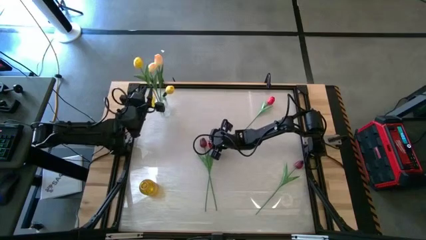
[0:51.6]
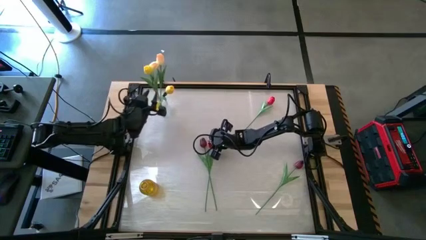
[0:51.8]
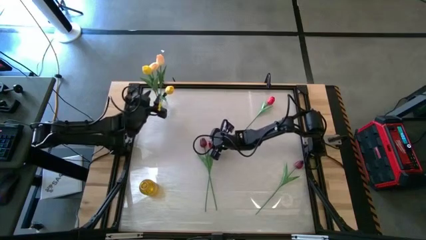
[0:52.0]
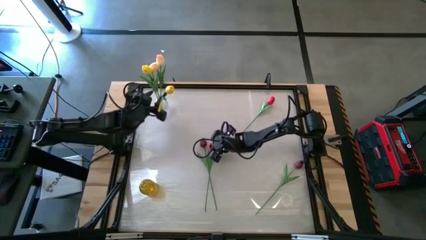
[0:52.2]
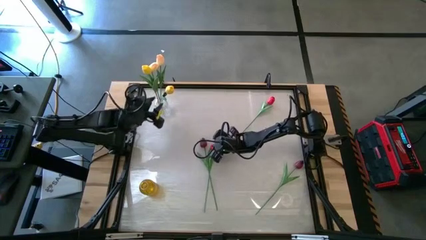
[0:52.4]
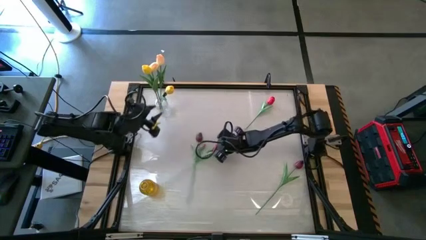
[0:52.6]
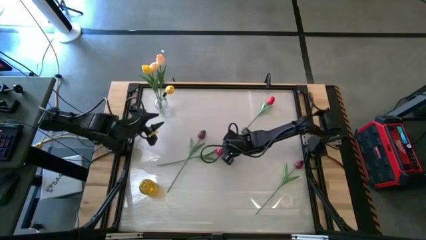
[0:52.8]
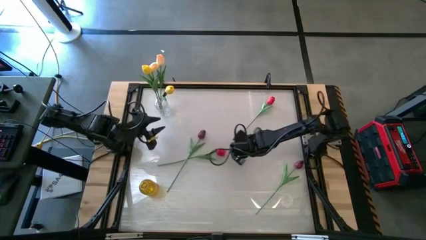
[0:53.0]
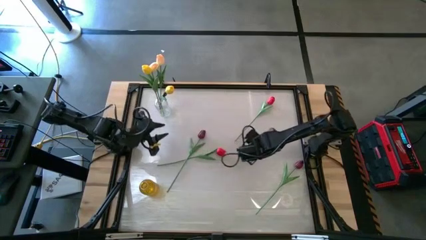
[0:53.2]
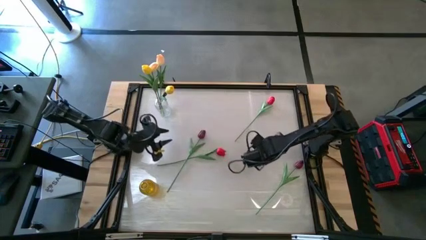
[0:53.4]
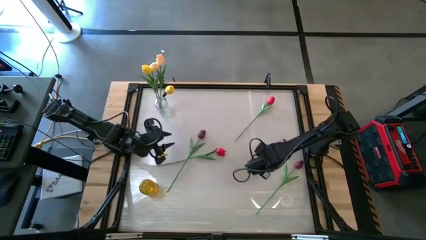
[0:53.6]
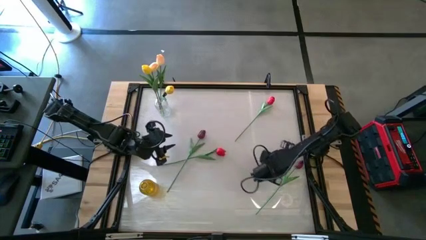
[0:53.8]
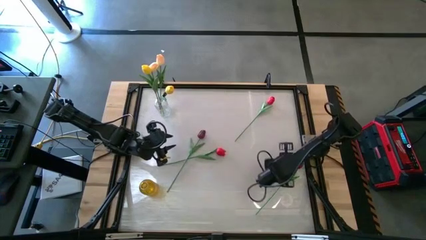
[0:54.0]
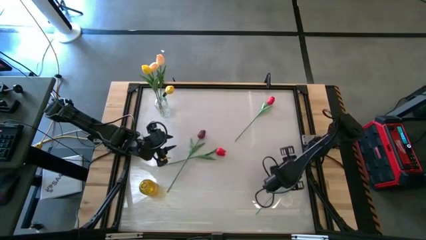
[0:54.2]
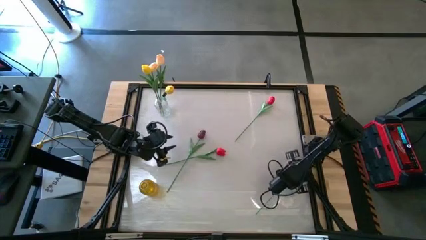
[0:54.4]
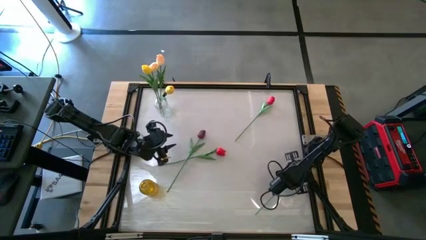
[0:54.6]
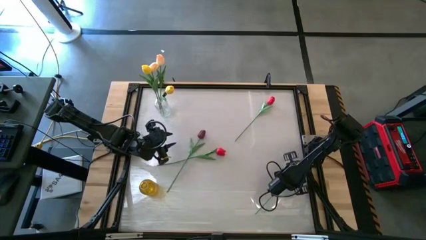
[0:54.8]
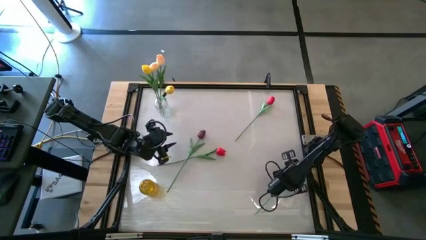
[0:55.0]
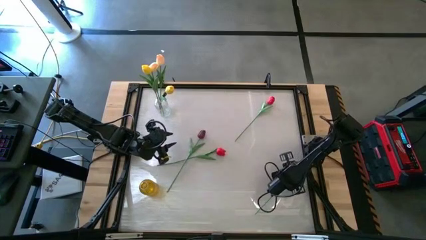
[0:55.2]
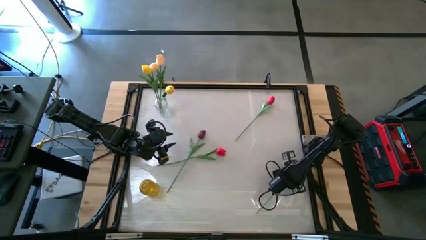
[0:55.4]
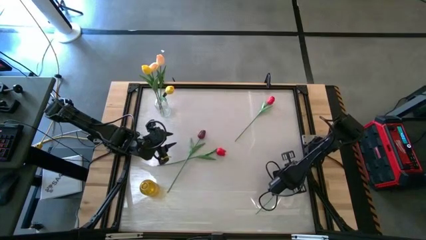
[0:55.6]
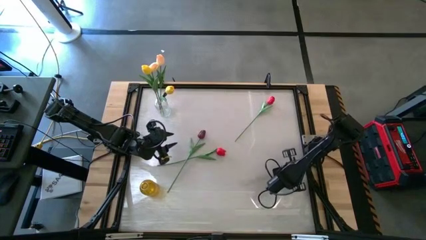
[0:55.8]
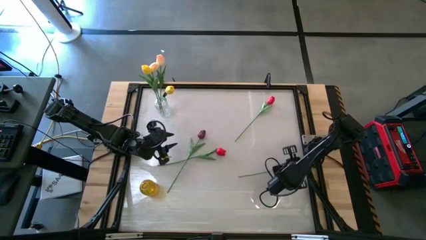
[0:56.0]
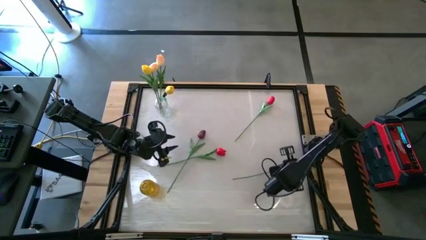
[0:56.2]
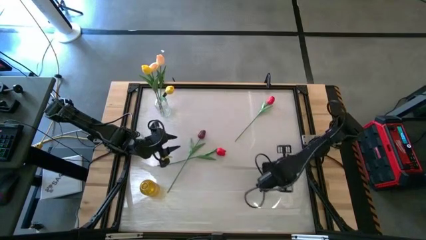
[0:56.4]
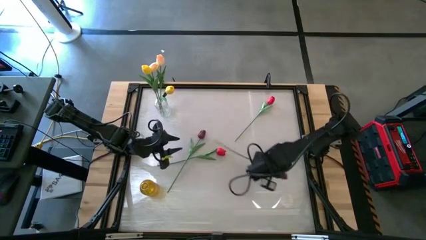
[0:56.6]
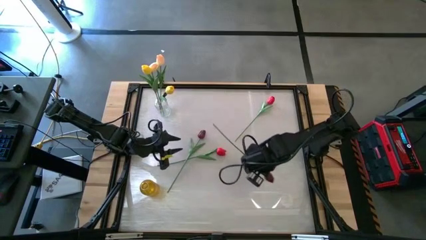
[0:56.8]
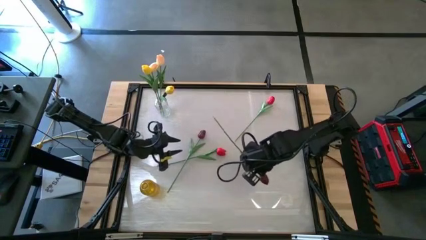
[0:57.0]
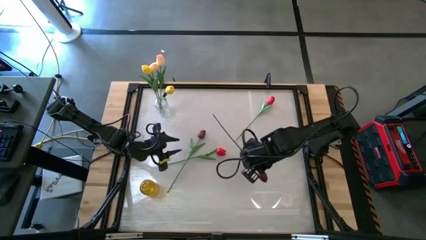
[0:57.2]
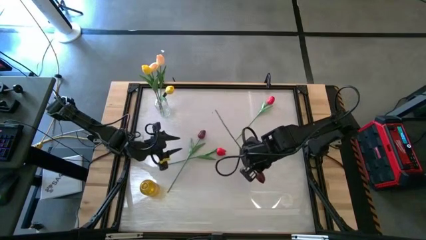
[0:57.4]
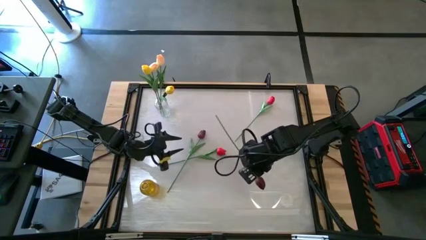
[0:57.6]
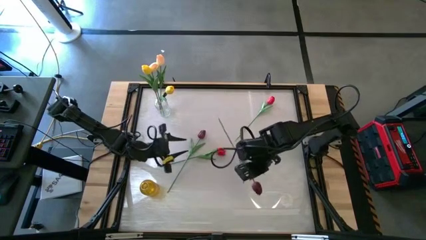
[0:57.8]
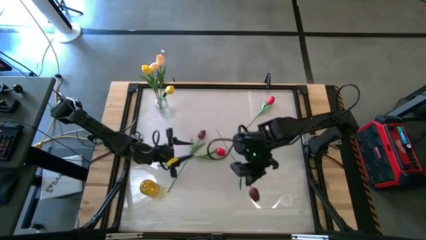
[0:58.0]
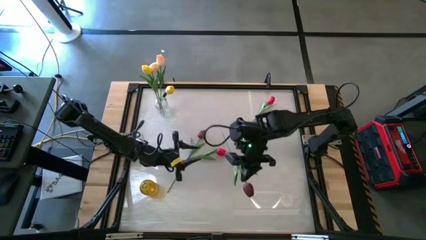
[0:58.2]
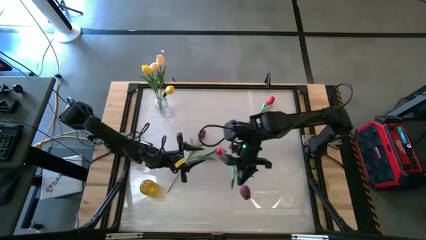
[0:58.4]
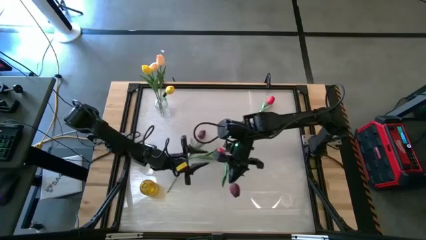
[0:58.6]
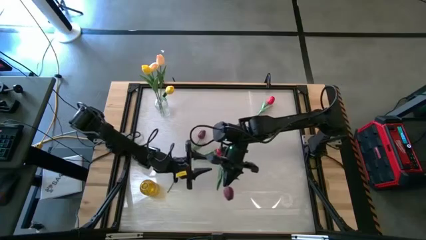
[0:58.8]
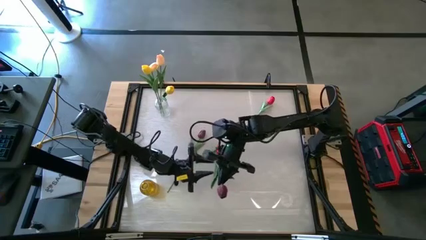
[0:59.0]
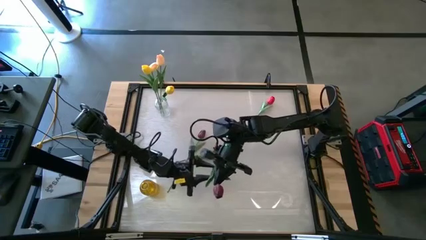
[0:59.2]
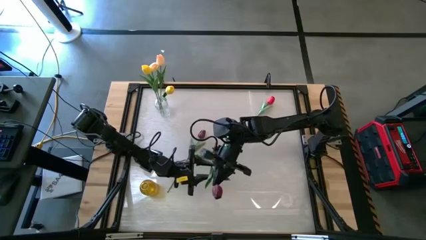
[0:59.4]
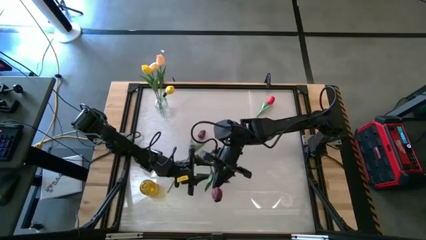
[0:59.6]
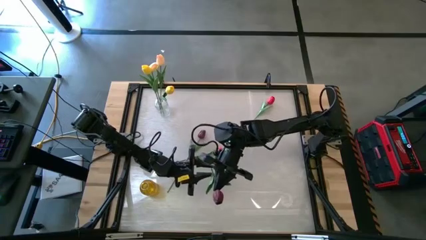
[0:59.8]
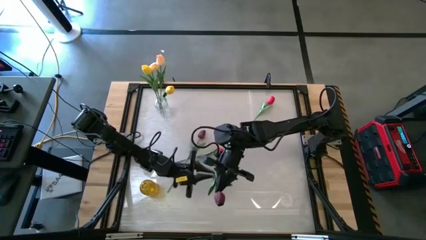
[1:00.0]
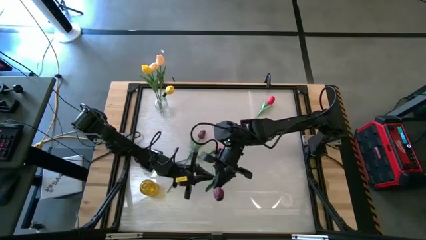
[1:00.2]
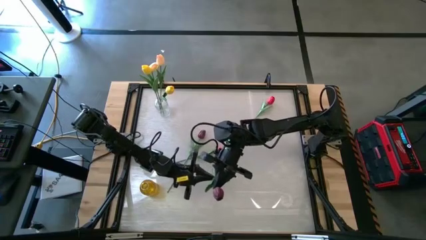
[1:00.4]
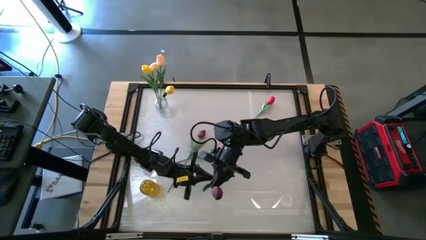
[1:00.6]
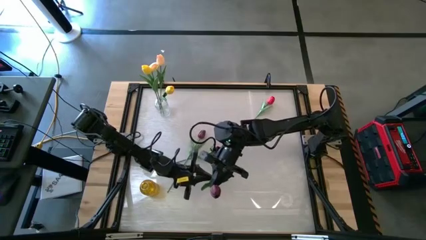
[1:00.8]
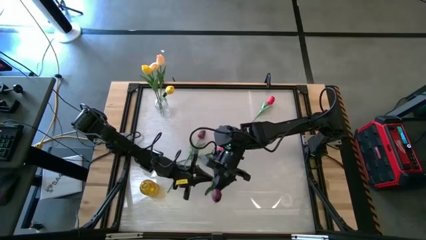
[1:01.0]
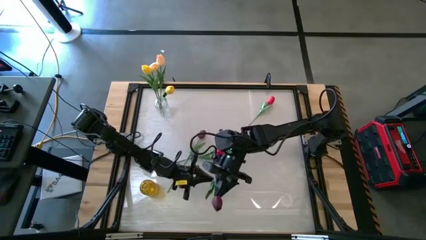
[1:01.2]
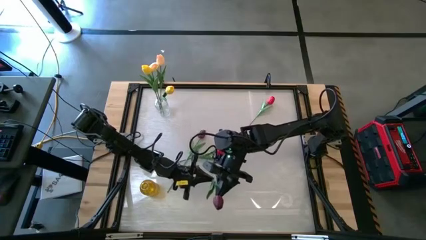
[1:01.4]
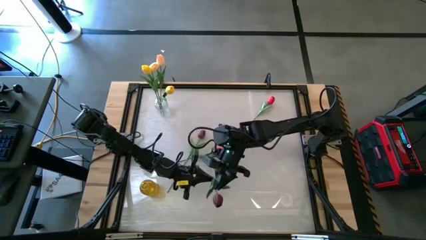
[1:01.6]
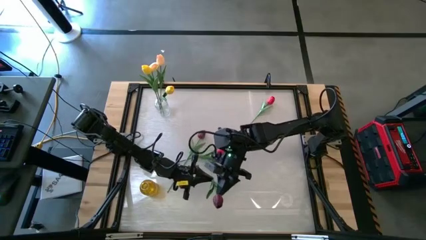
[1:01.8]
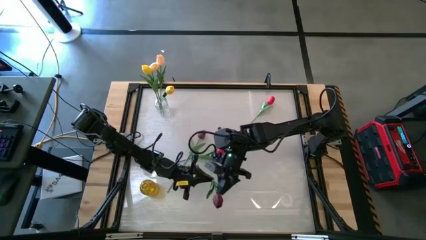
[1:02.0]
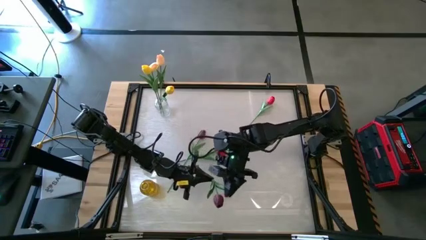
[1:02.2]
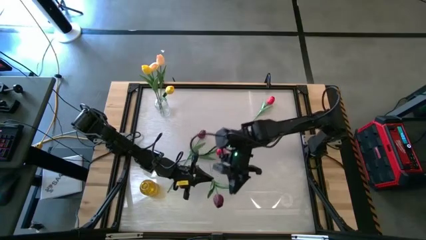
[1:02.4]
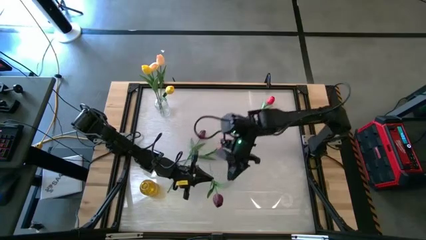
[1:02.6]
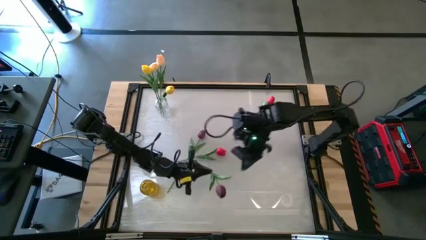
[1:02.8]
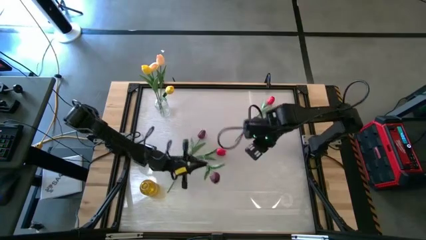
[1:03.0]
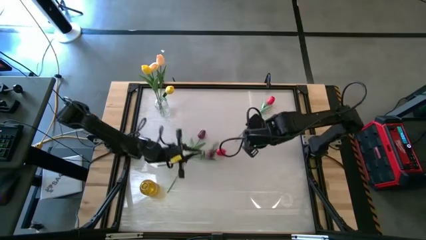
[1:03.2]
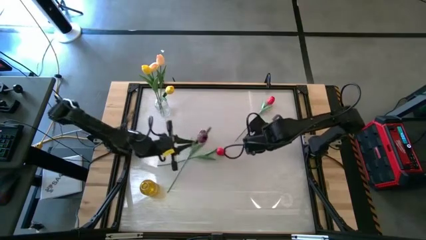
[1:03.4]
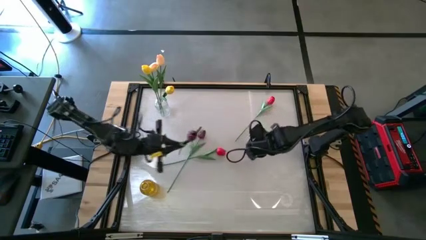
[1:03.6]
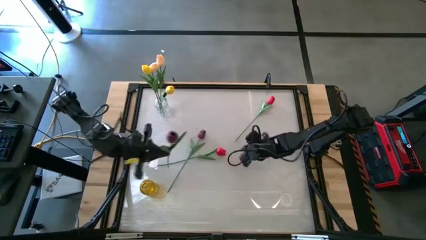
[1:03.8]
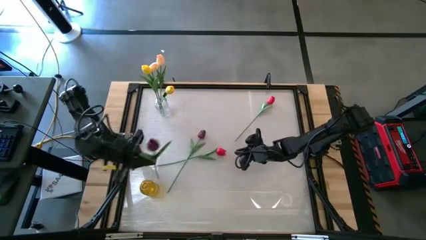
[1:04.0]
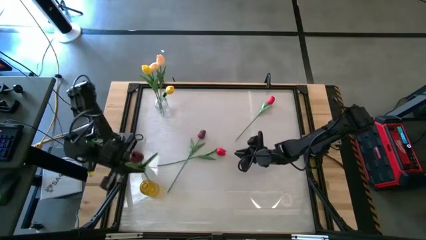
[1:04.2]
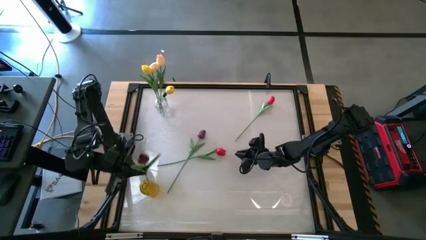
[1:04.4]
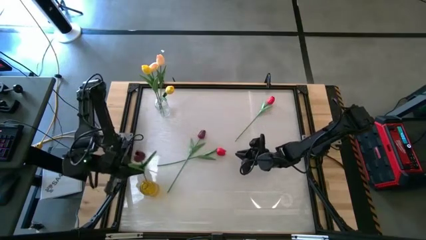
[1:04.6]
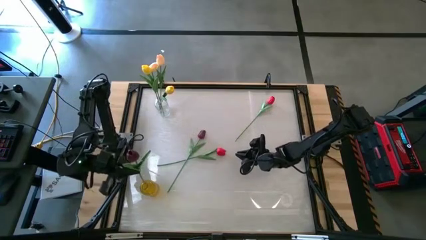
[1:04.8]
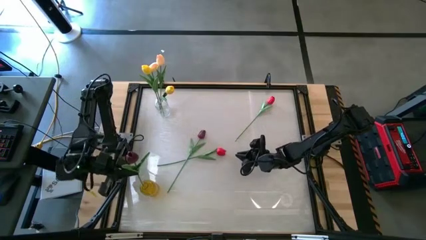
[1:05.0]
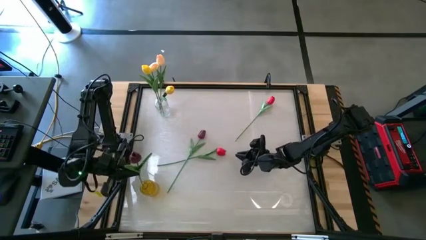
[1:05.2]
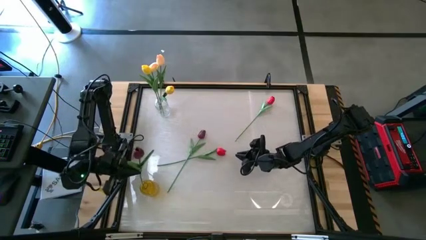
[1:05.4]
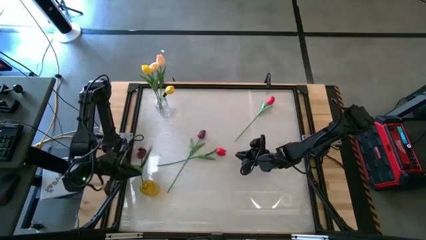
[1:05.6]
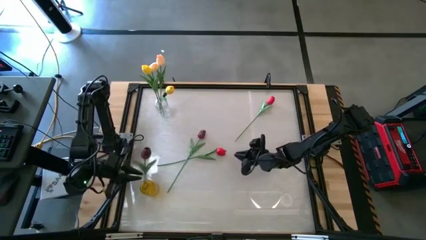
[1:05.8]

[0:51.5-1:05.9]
Task: Sort flowers into vase by color
Put the dark red tulip into the orange vase

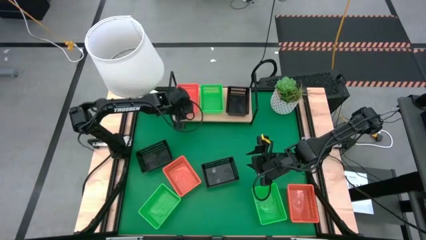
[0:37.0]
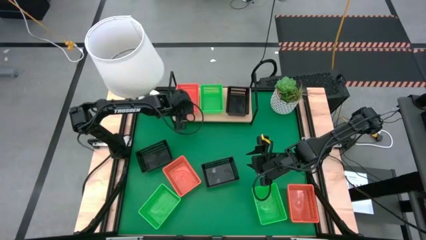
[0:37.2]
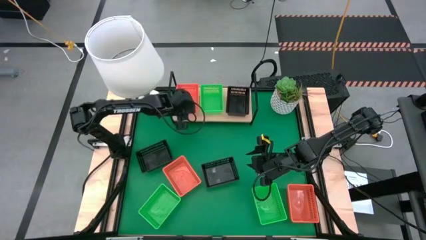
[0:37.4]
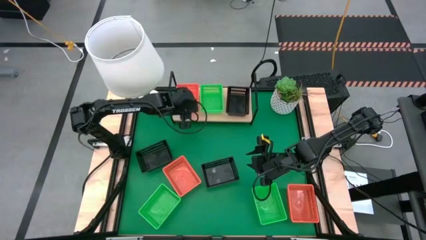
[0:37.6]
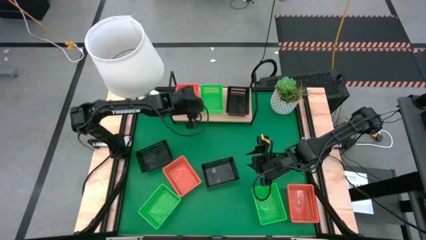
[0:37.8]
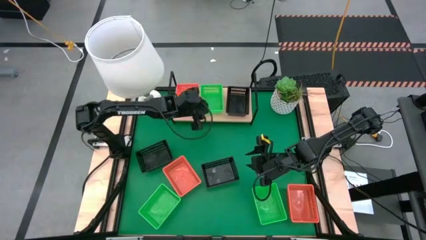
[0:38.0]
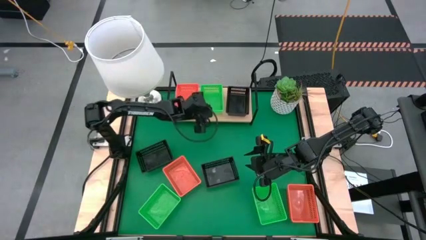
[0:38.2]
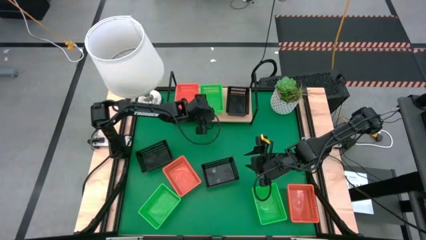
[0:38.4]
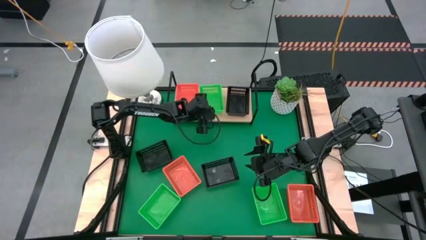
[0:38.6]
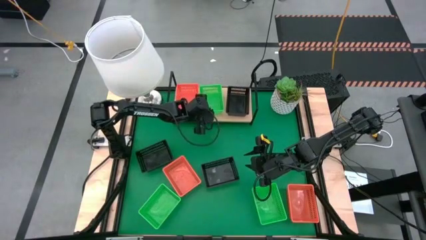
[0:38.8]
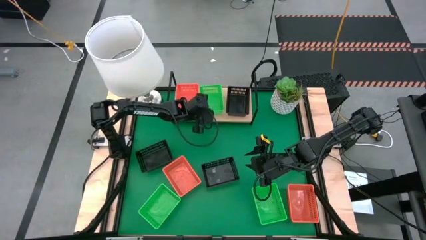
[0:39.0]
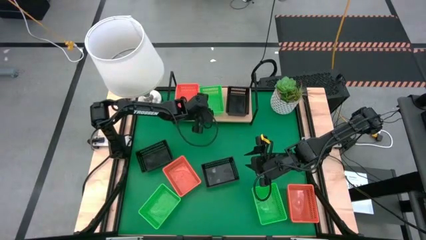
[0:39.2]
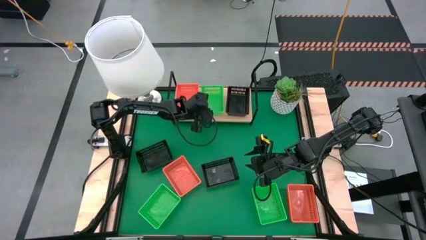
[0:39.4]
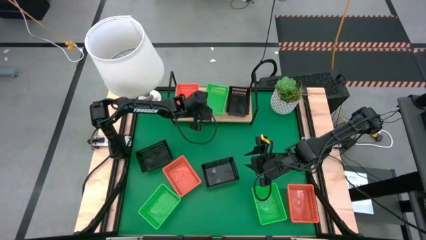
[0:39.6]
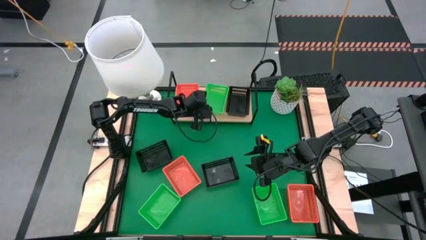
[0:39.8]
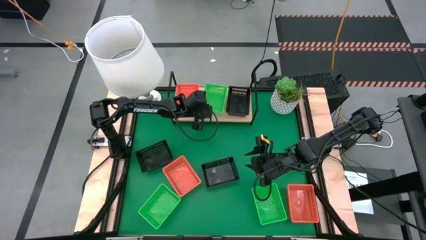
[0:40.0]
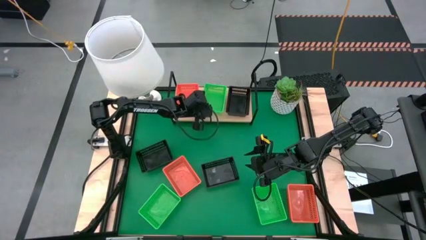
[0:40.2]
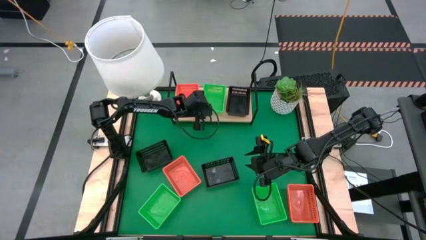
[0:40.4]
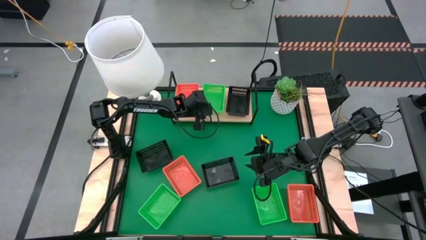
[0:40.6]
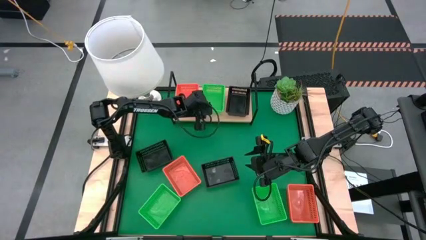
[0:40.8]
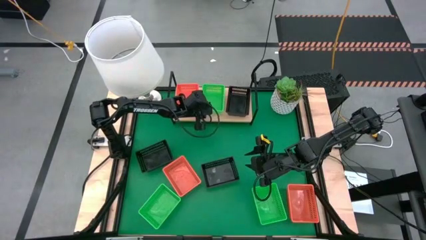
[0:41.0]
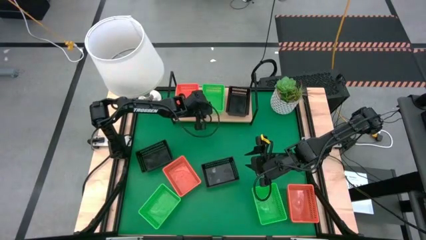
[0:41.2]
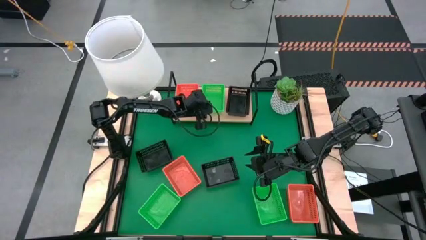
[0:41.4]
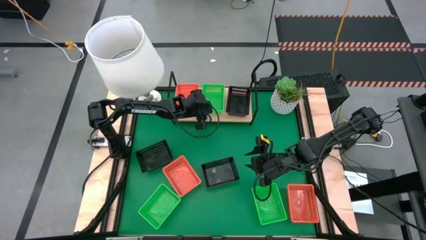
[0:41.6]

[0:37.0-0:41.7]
Task: Stack baskets on shelf by color
Adjust the green bin on the shelf
